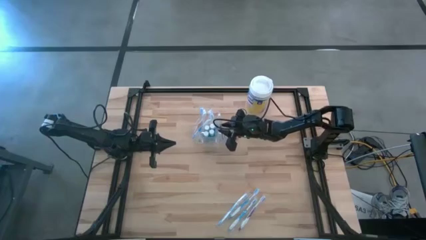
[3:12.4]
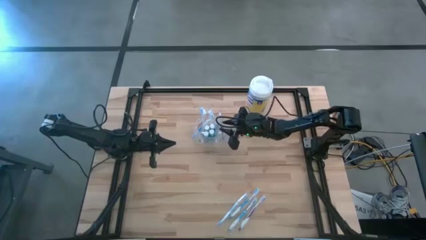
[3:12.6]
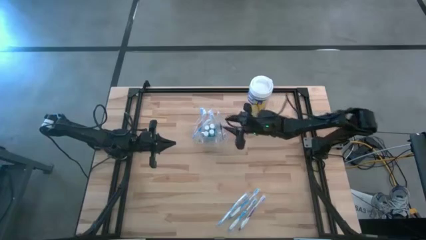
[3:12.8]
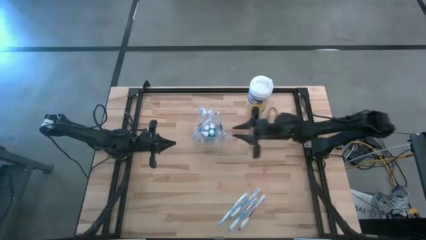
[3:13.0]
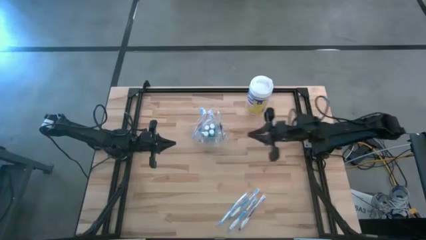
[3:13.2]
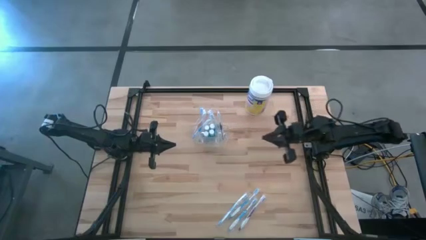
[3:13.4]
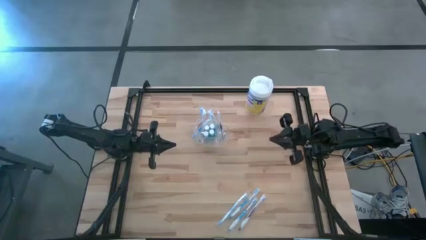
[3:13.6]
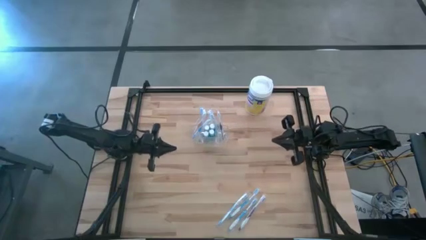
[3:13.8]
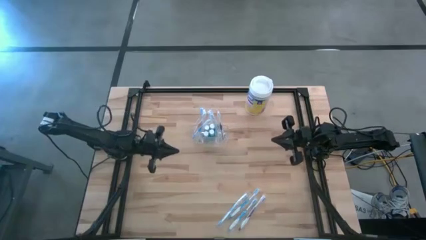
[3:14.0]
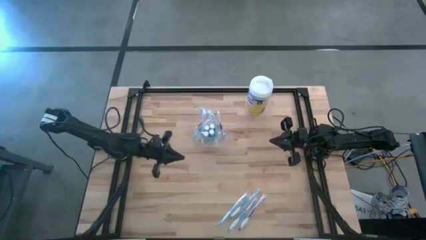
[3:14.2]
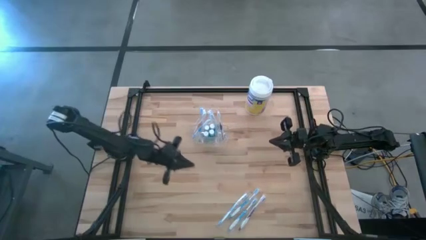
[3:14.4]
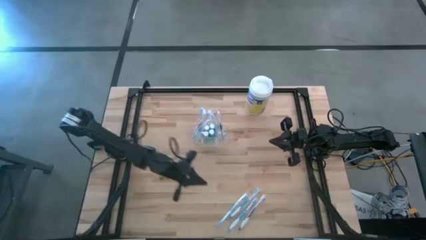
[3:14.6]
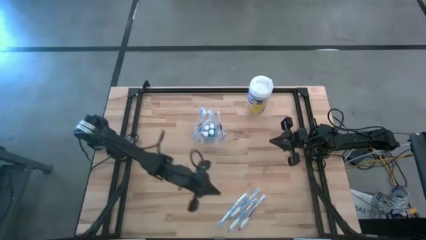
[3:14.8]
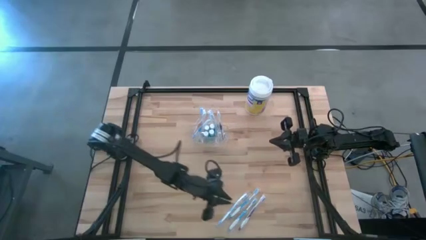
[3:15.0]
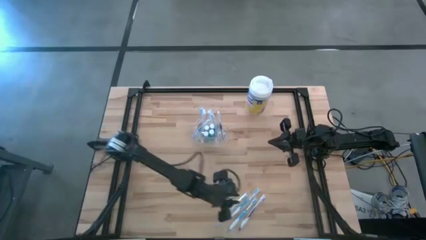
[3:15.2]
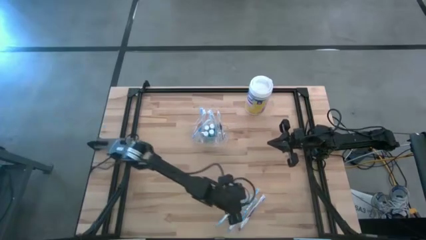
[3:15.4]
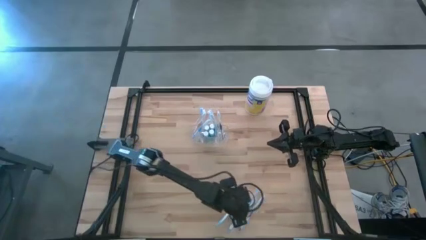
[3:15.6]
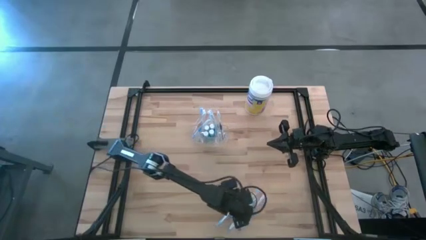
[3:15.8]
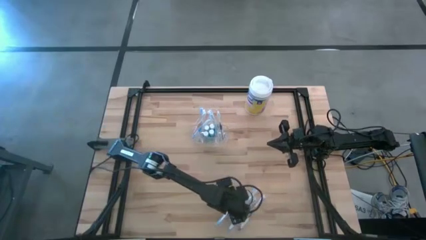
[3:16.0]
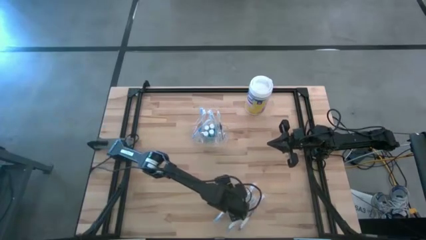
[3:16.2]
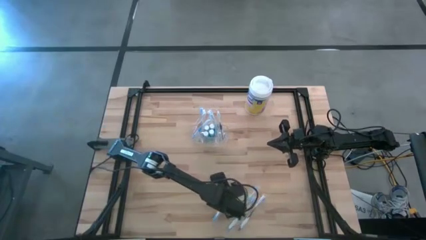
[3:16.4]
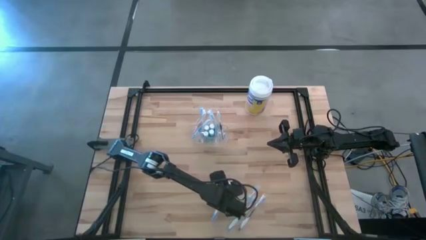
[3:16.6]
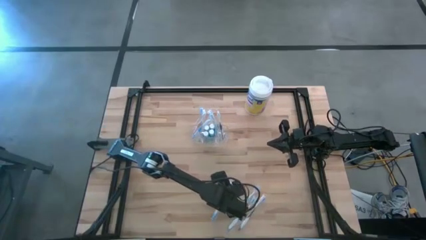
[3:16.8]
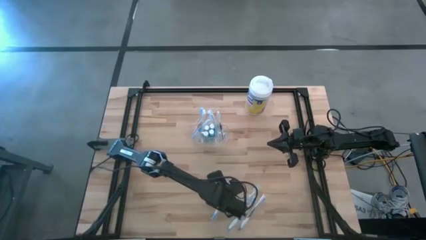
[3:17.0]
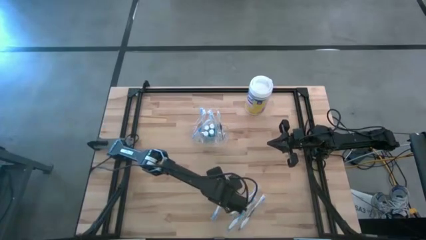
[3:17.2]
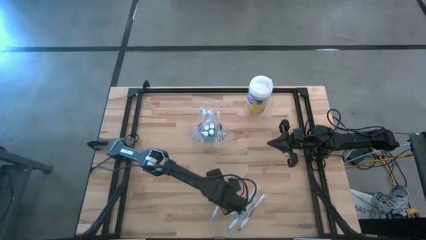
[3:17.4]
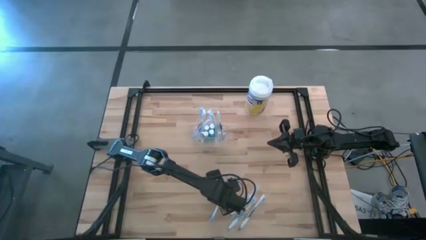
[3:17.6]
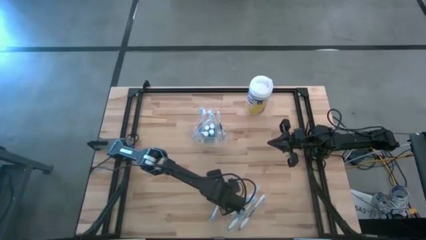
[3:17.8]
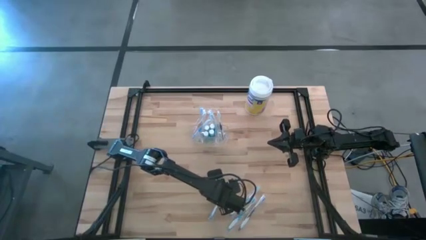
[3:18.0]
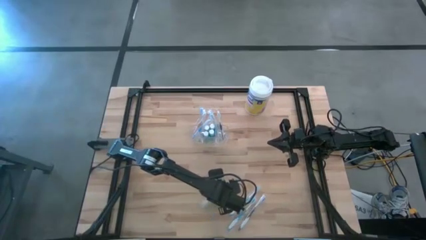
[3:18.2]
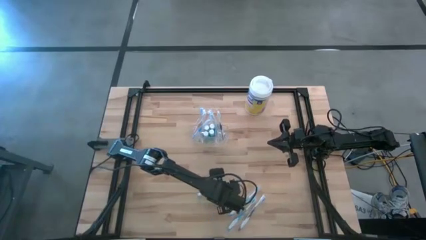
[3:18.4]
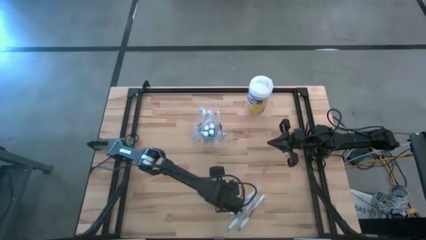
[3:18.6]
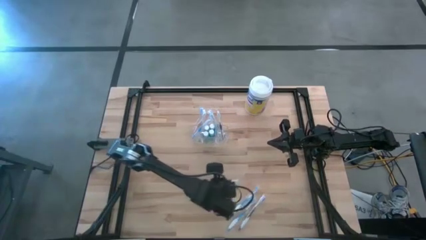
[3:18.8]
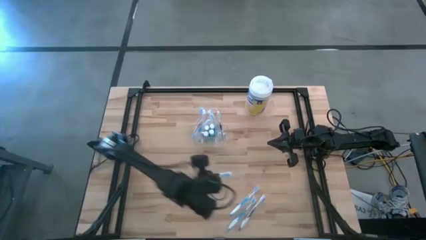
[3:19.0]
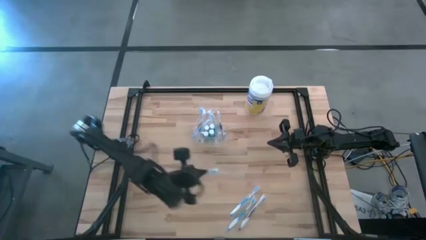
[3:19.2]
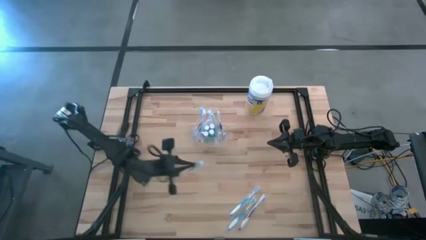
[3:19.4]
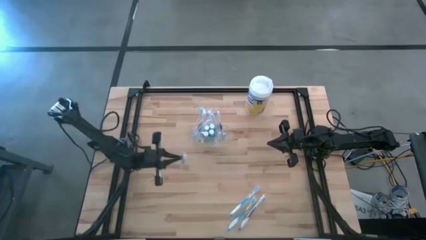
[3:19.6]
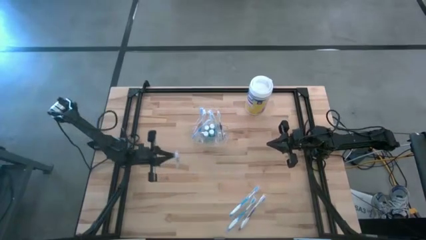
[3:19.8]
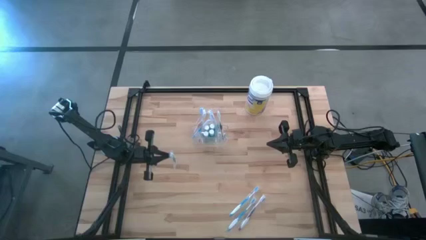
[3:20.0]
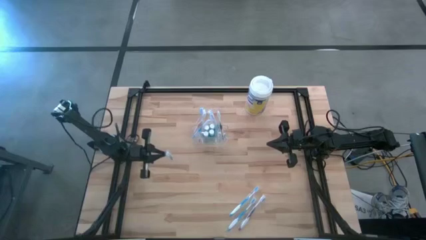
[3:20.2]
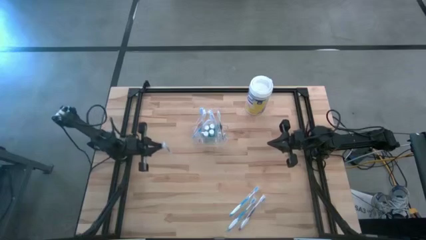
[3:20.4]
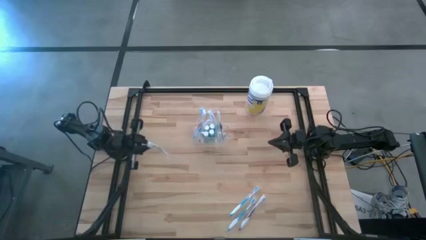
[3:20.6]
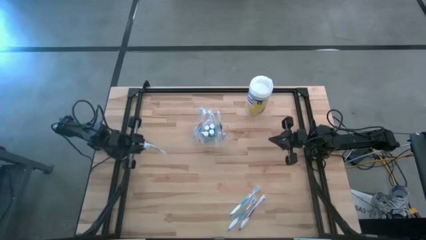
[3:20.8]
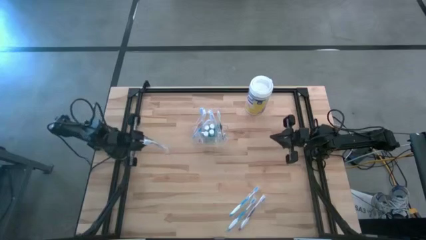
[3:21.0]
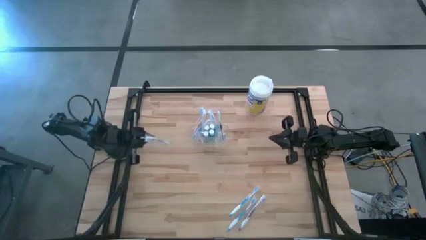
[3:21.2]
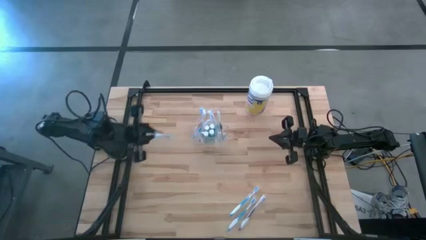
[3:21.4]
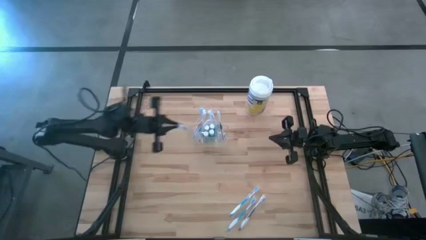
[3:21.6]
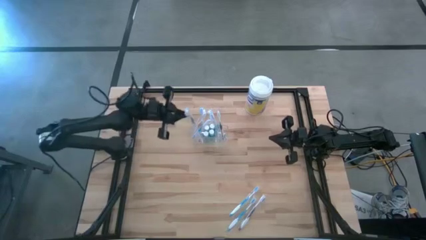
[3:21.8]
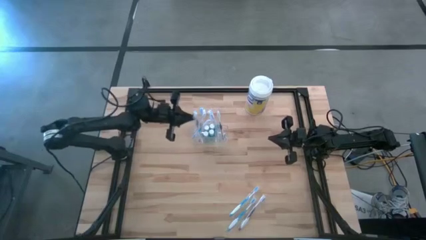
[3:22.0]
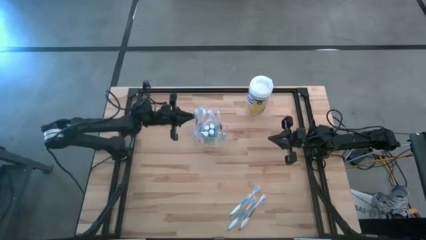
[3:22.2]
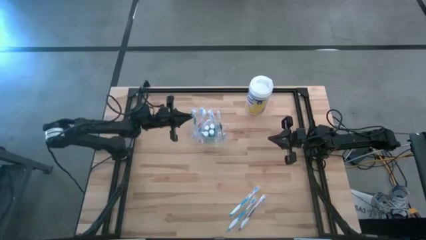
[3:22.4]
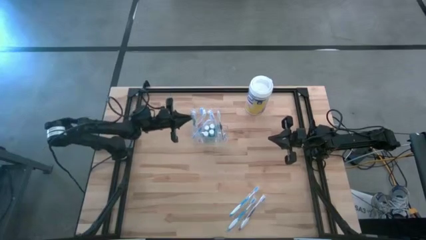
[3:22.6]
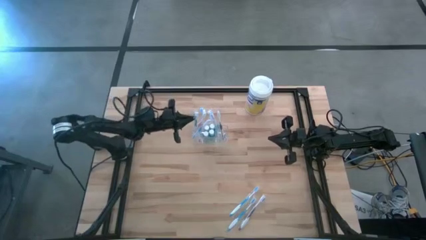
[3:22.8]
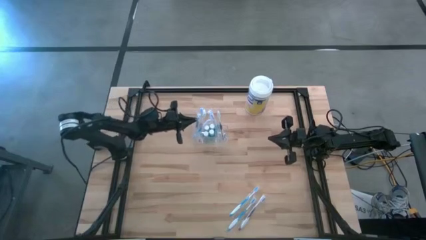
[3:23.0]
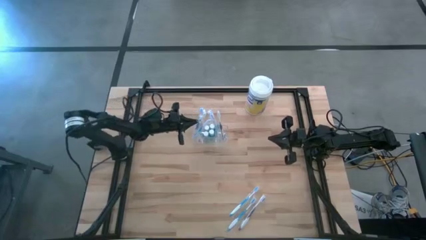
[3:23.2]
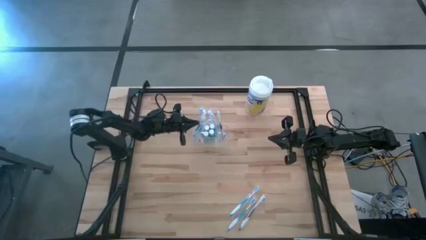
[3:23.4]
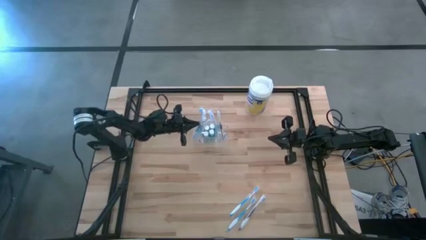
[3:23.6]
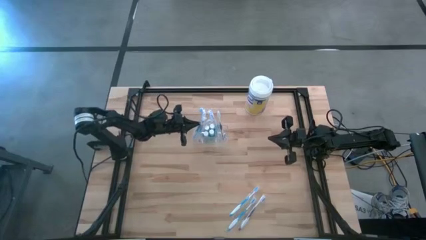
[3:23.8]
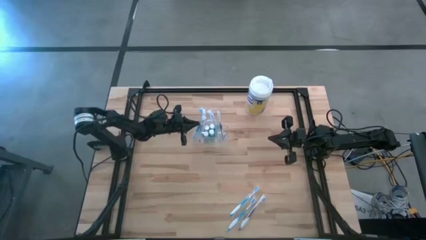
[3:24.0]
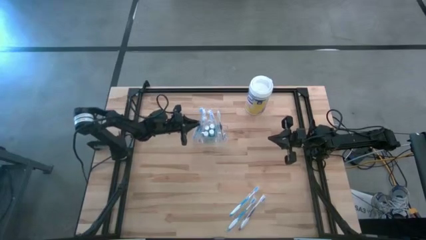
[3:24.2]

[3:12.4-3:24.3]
Task: Pick & Place toothbrushing station
Put the blue toothbrush into the transparent organizer

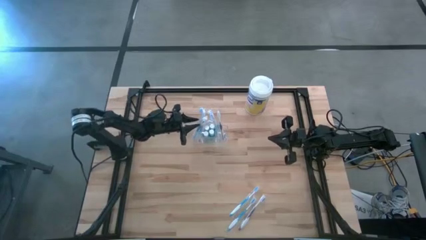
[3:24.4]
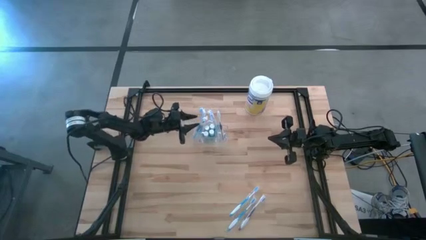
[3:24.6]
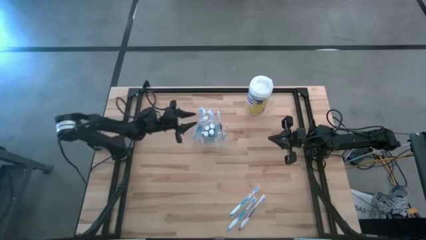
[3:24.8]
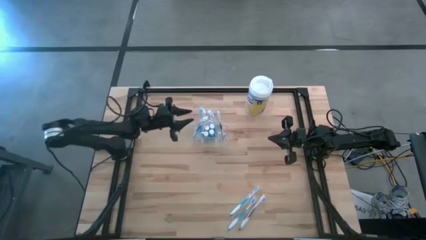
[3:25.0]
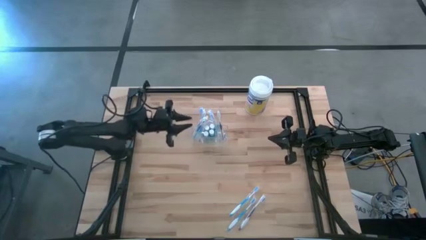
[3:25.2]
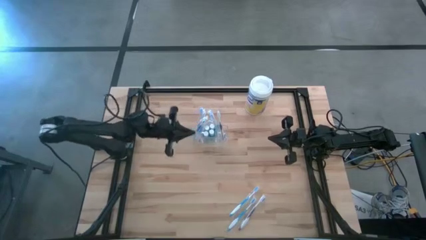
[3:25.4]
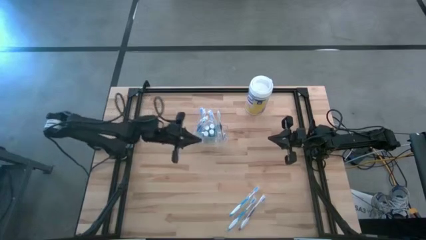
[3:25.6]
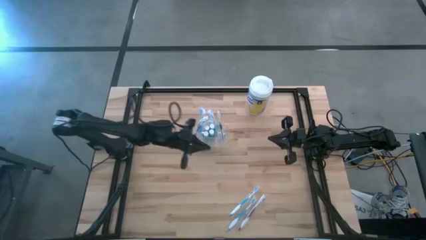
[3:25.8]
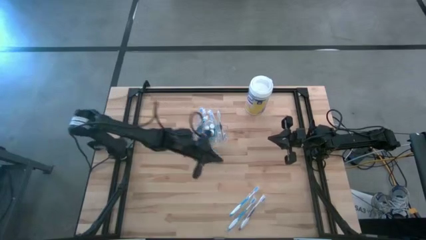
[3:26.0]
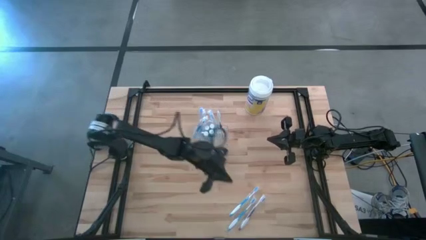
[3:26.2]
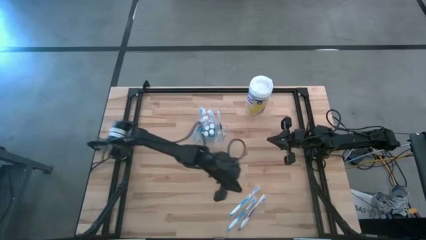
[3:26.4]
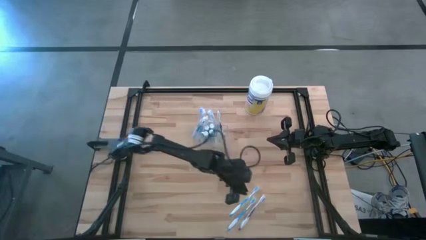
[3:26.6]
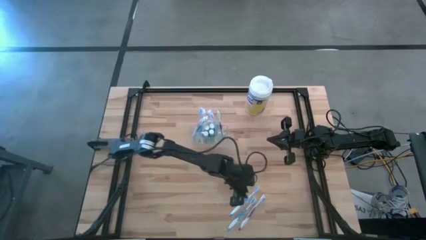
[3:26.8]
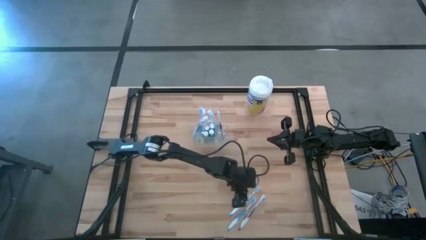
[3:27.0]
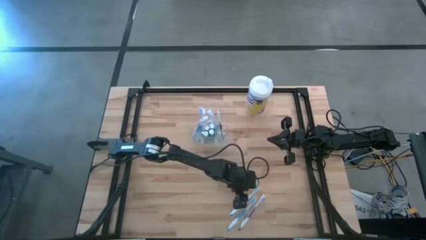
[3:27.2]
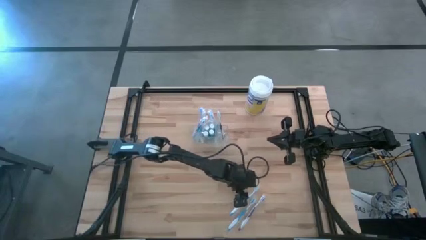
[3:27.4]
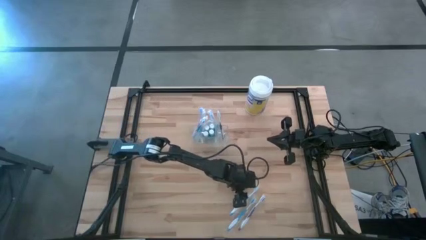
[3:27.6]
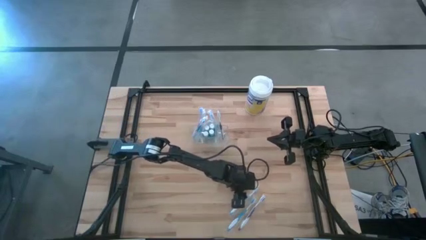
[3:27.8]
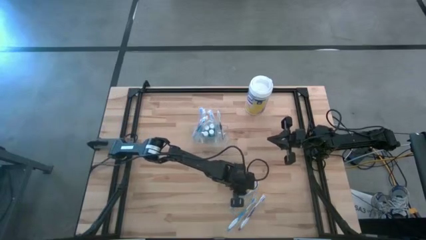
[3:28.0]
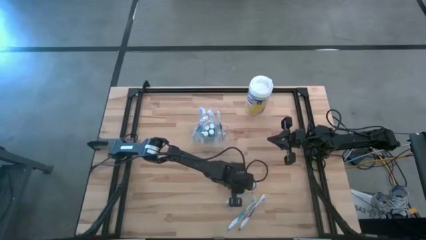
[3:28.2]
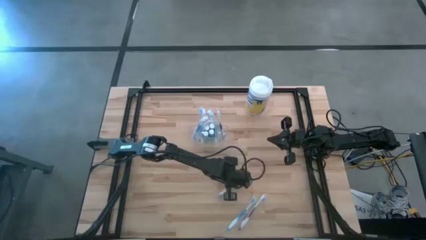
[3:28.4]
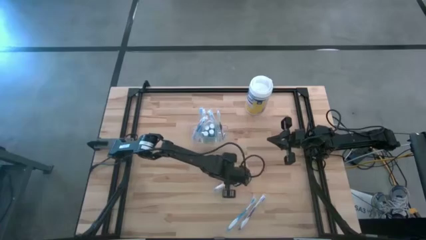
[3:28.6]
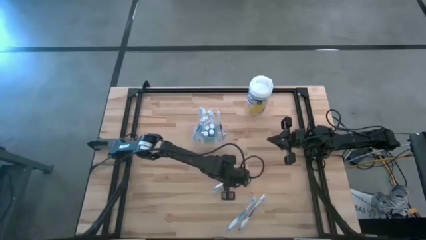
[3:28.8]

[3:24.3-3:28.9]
Put the blue toothbrush into the transparent organizer
